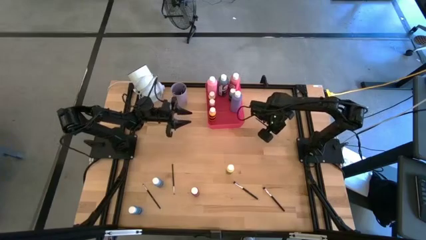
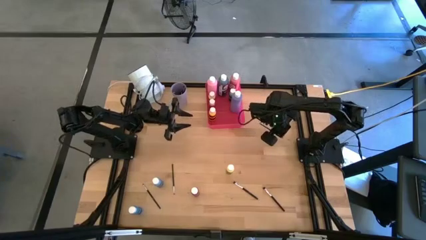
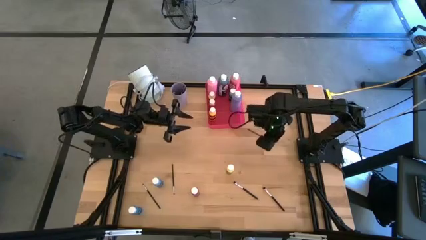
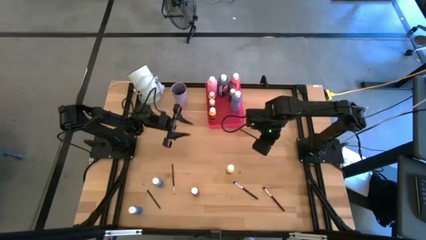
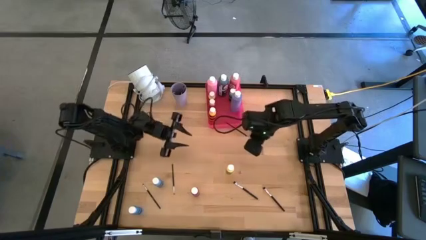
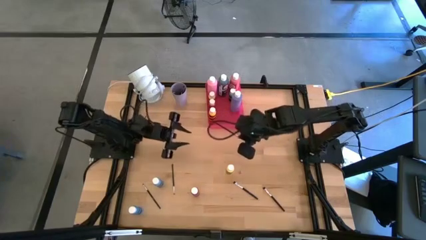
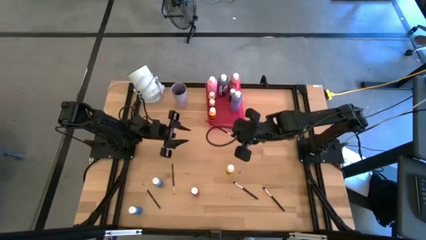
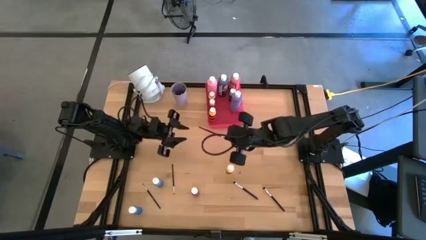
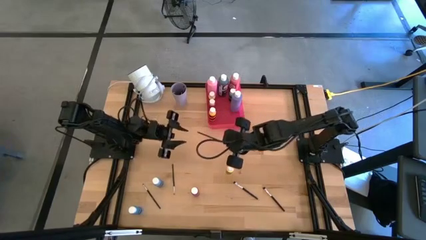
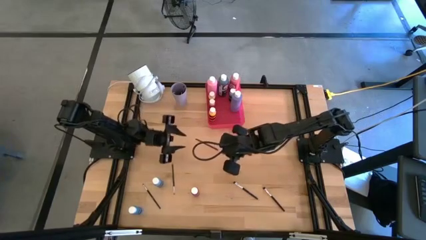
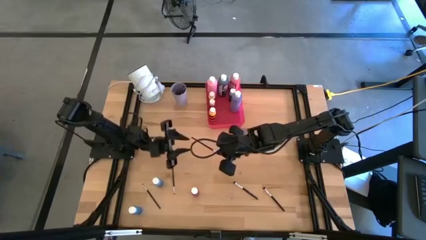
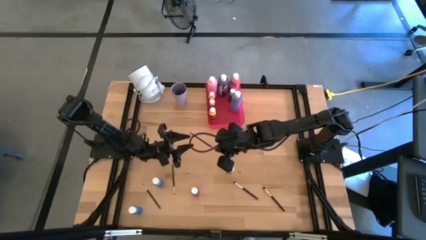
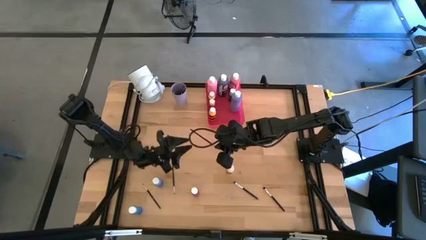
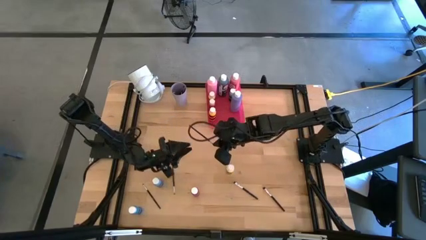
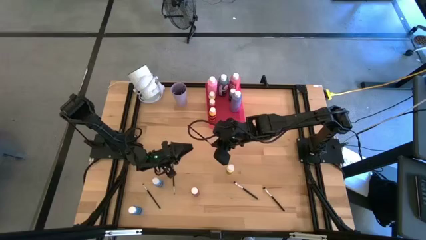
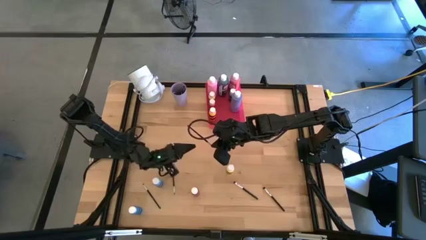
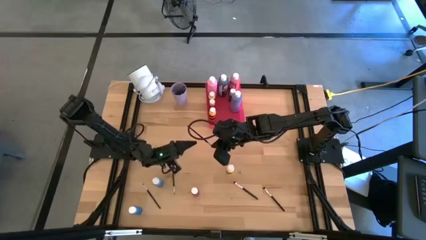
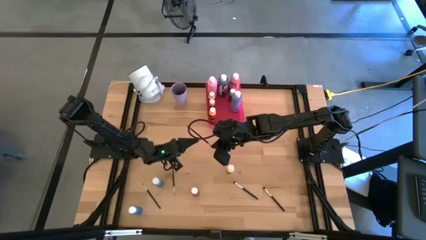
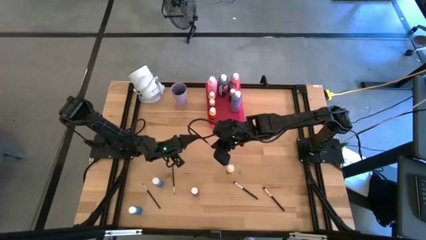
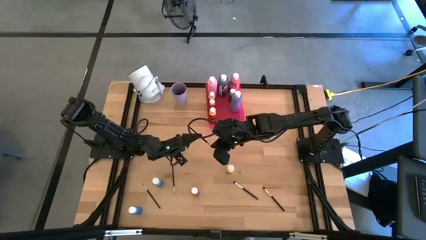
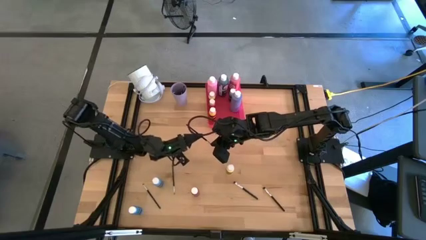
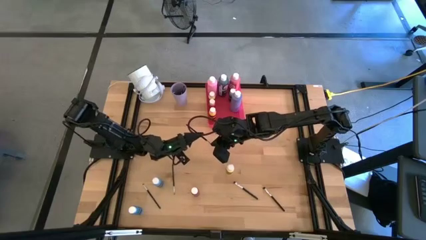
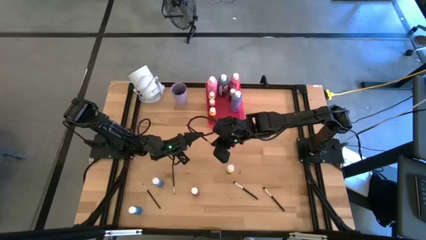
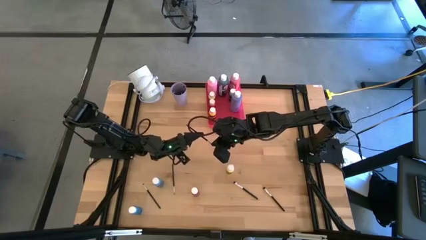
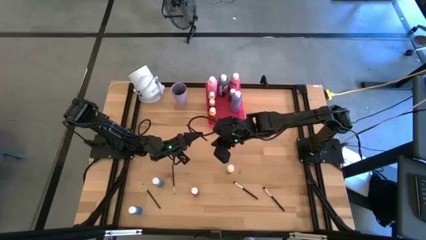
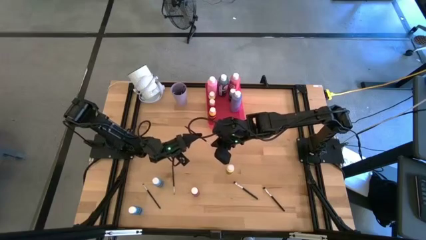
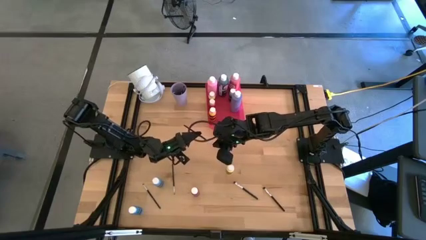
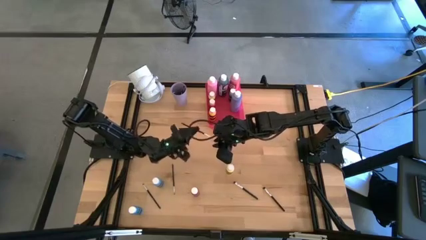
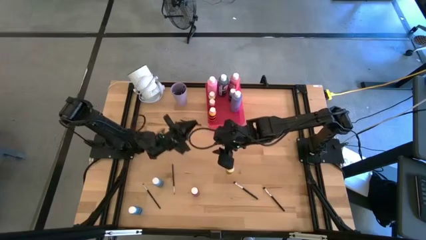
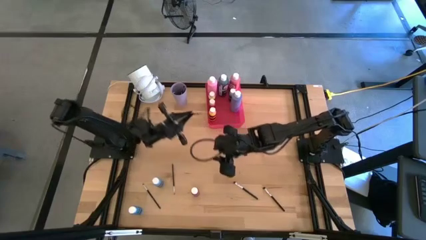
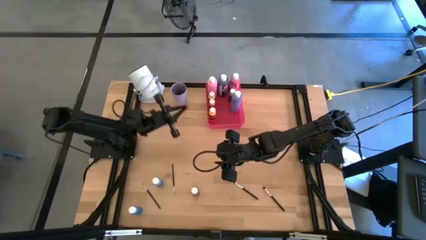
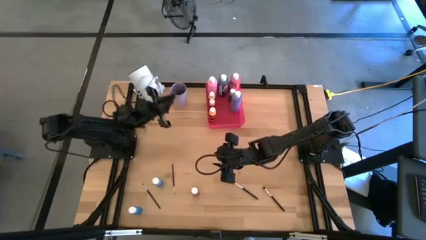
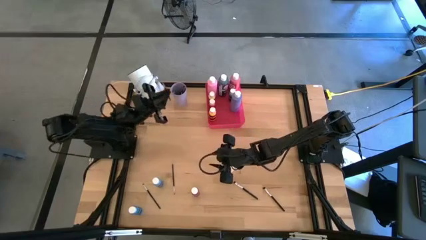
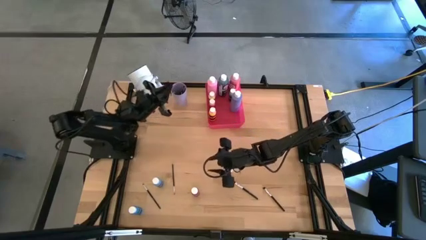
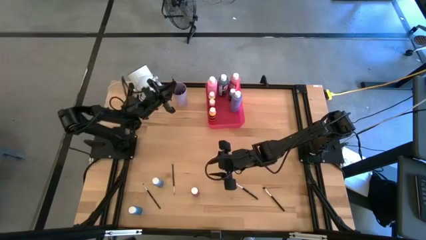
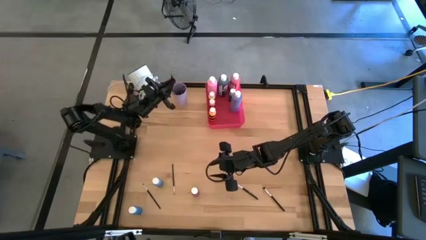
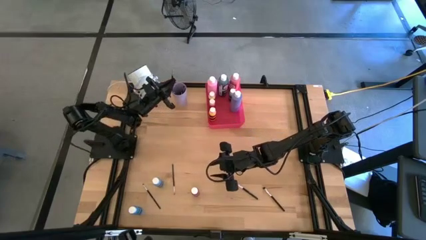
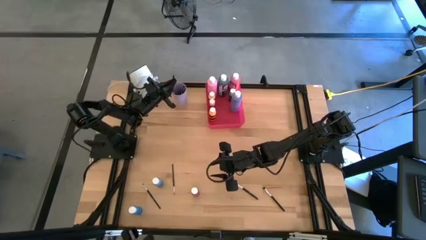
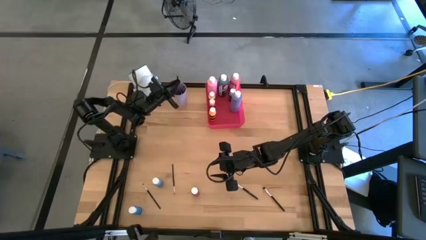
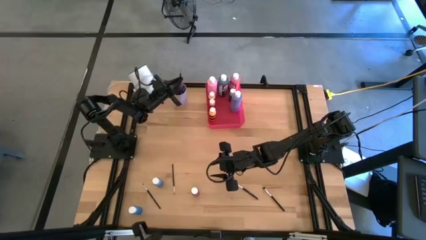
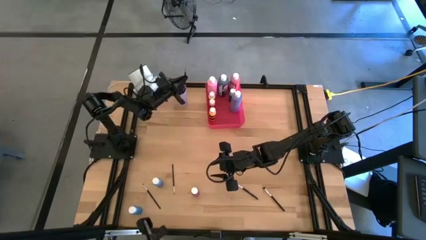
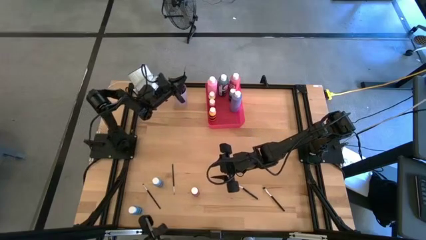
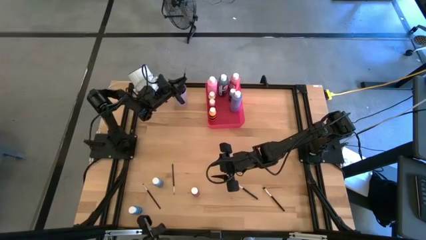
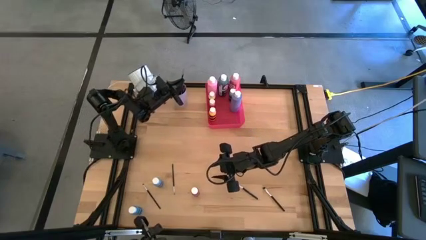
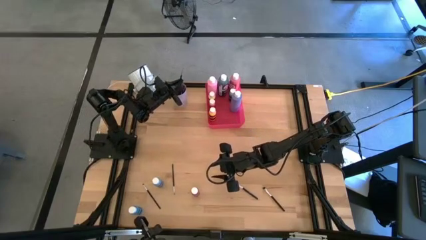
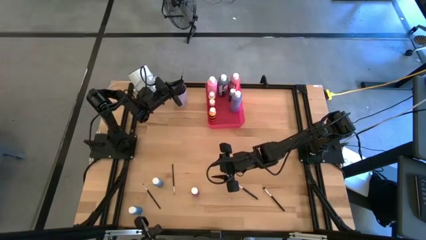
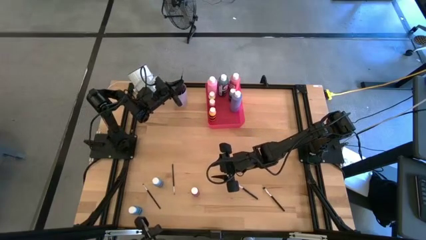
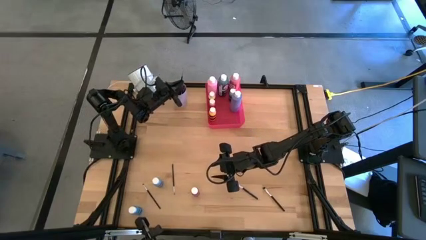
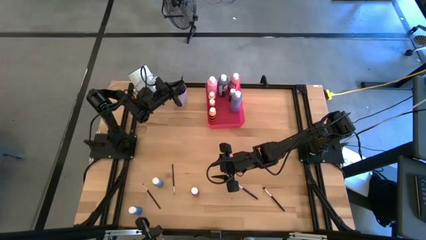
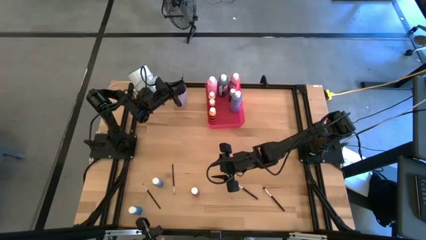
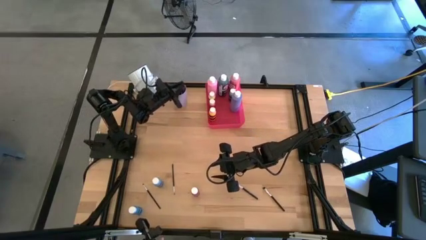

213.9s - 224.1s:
Task: Pick & Place Paint Supplies
Put the black paint brush into the purple cup

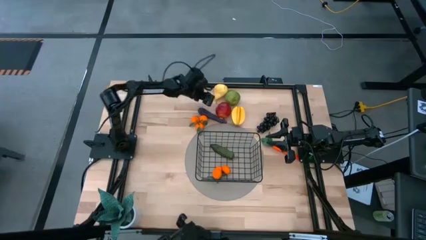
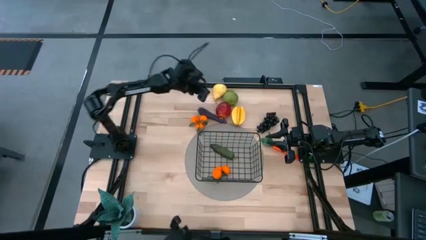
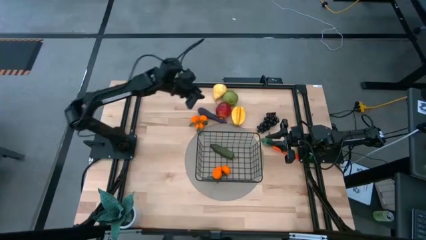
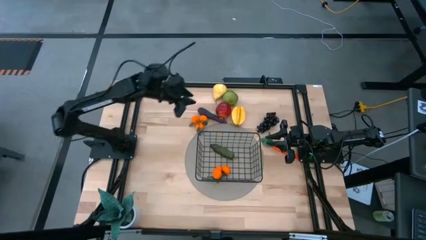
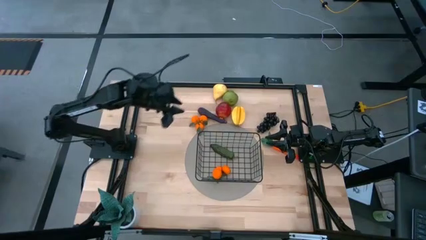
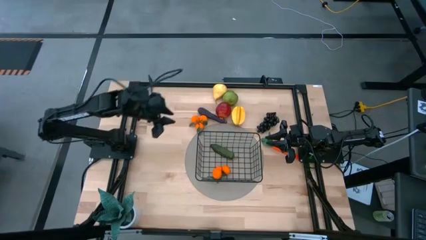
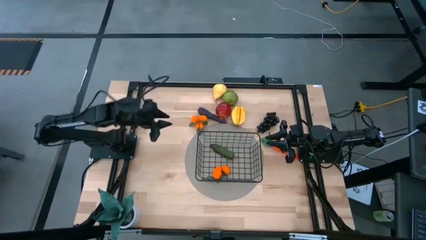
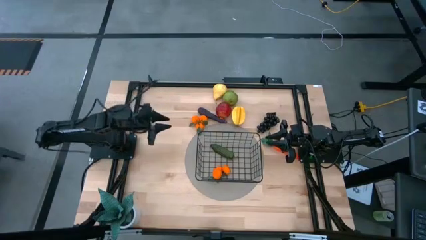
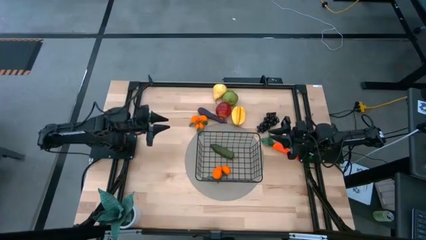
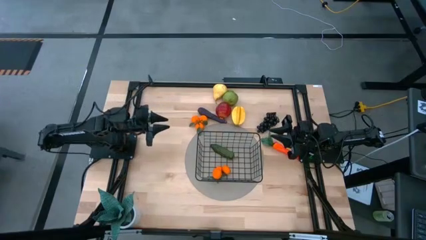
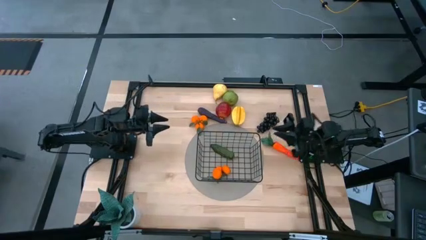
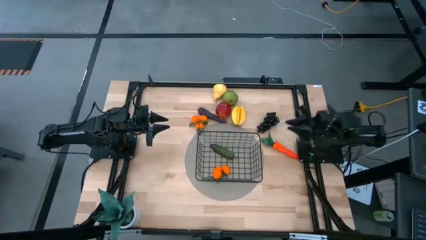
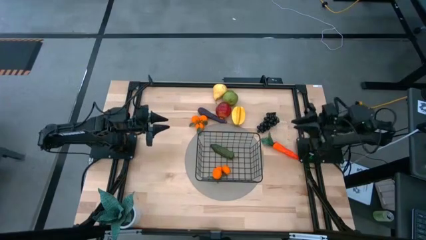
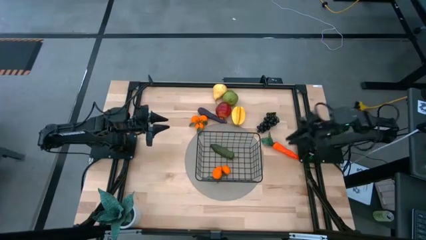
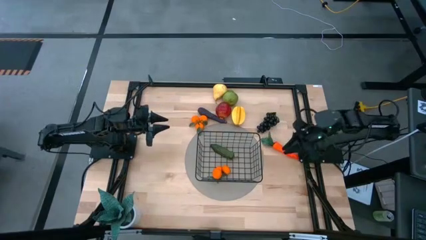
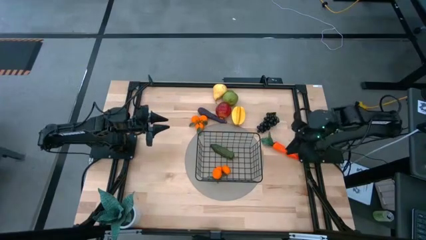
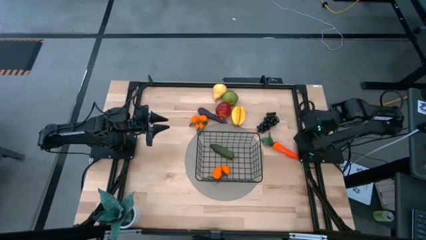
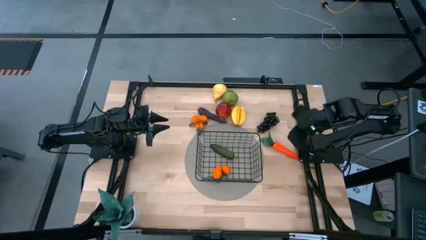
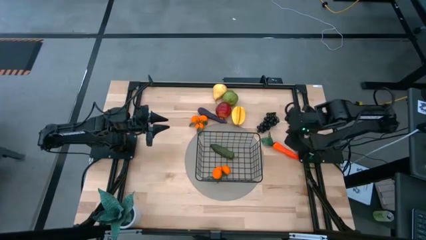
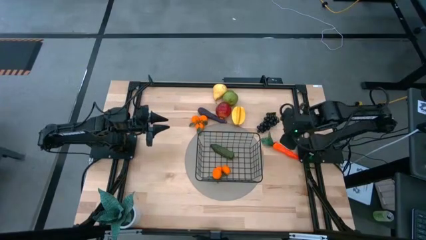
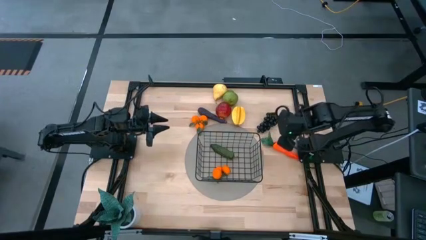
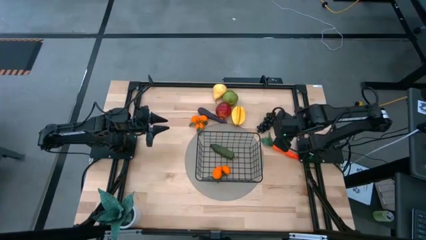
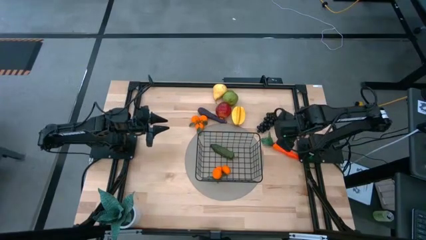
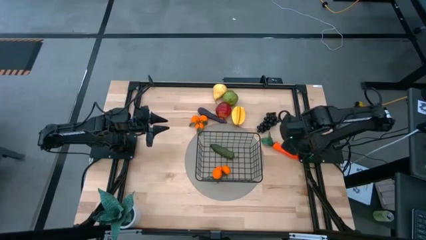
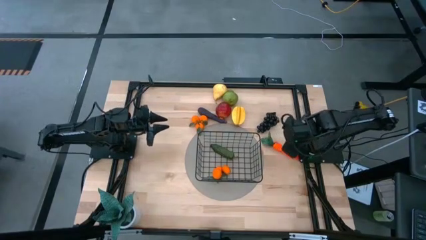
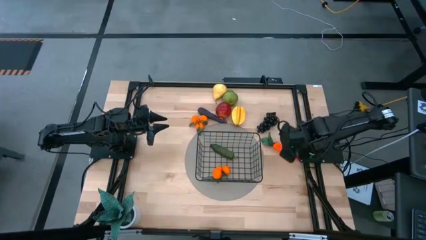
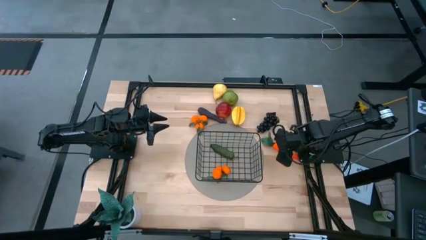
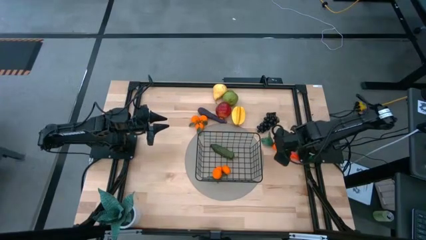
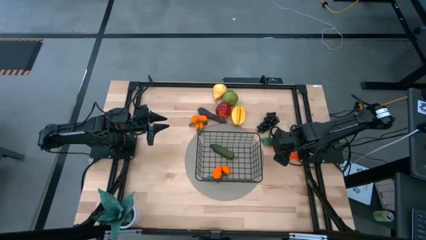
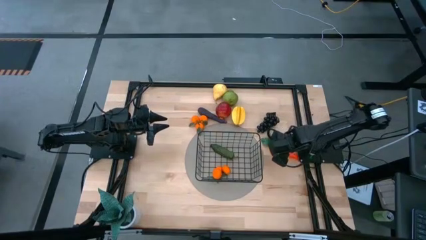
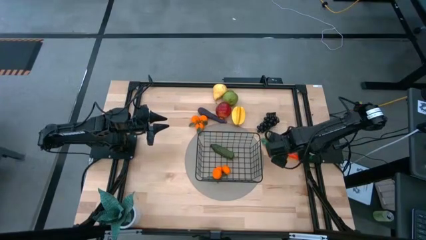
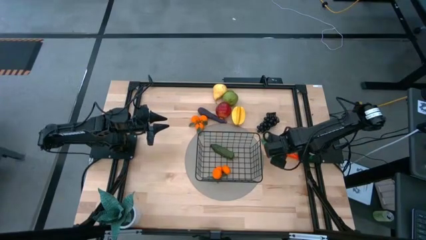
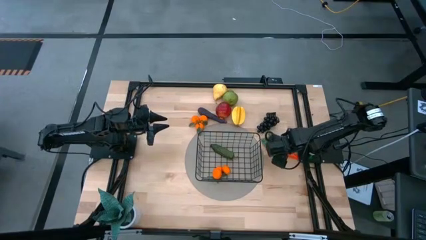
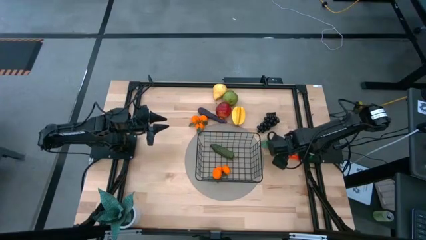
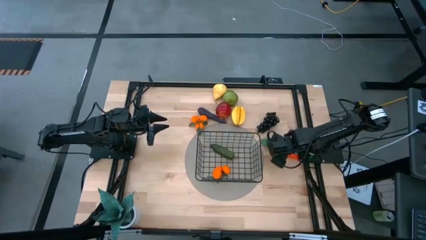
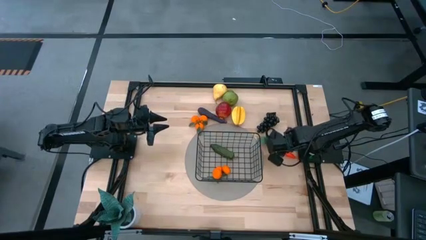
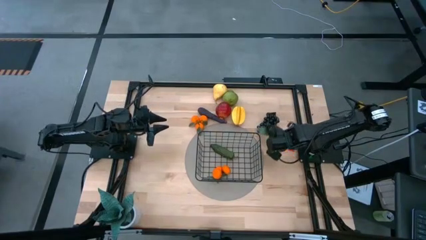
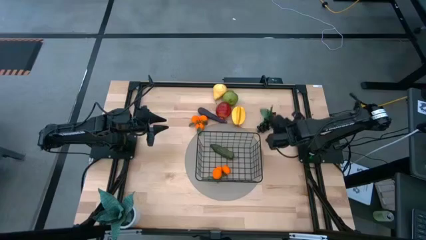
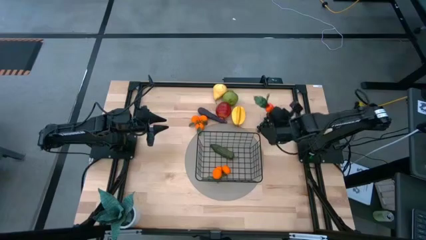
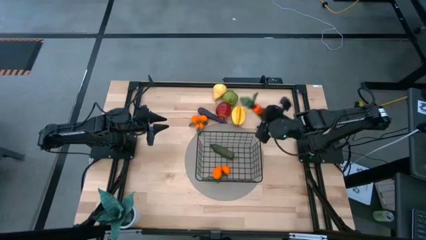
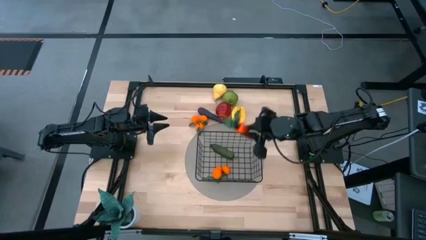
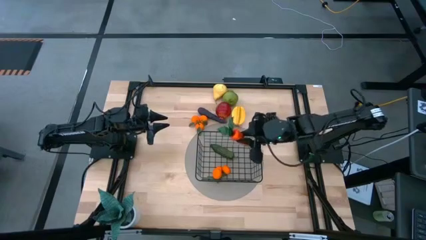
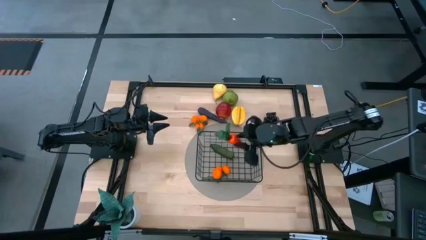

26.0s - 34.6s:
Task: Build produce basket
Put the carrot into the wire basket
